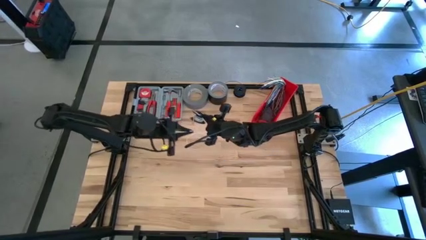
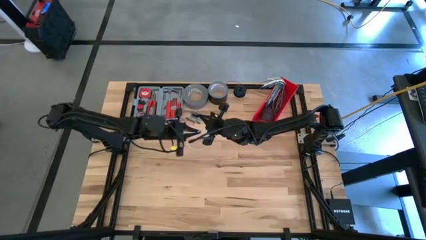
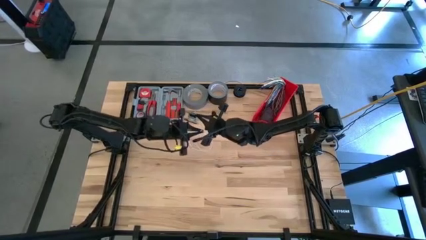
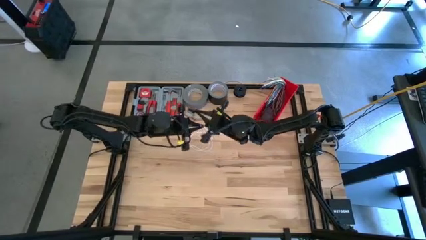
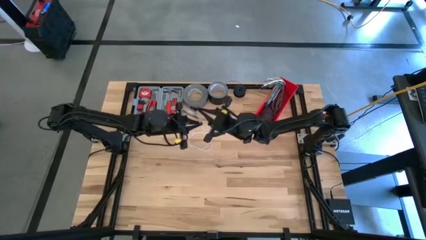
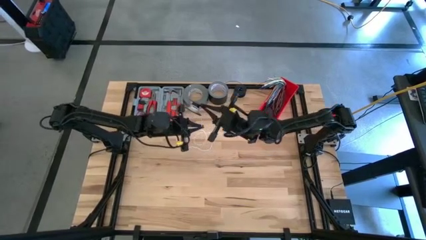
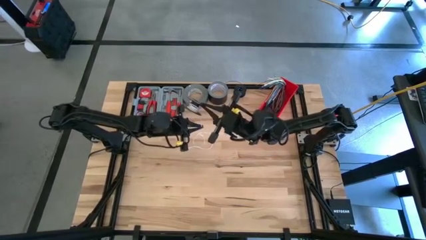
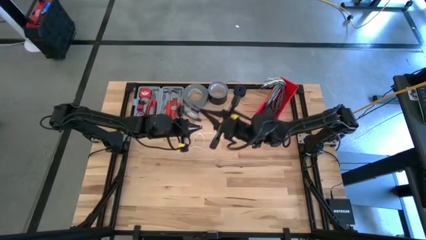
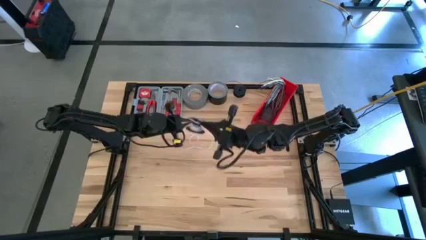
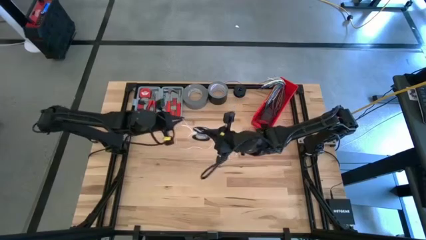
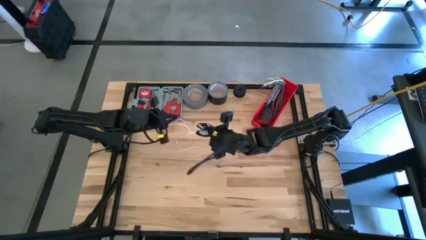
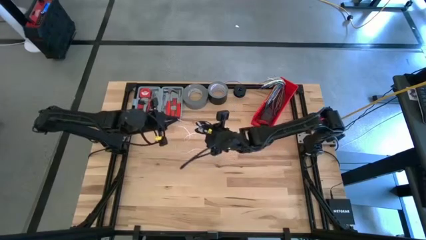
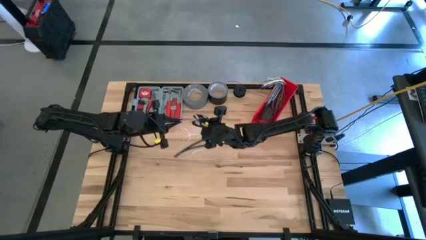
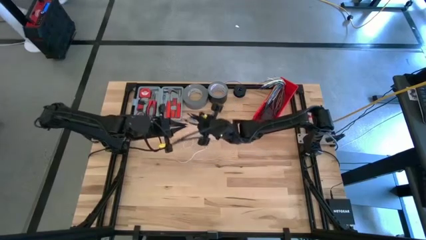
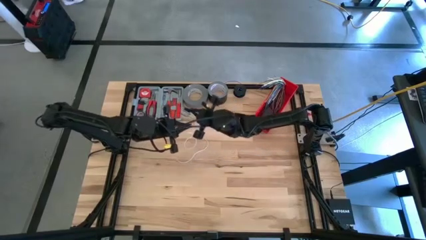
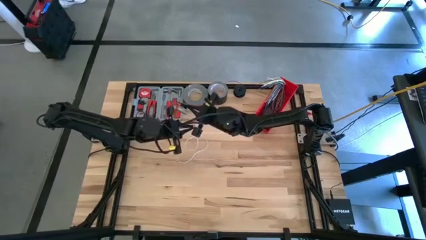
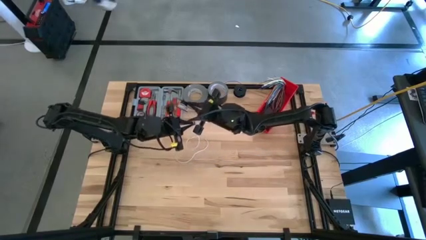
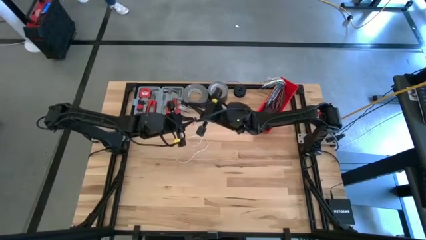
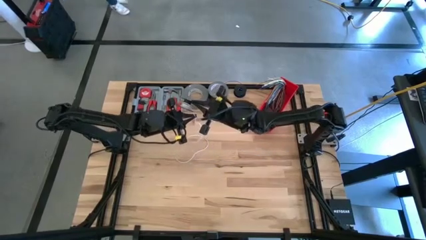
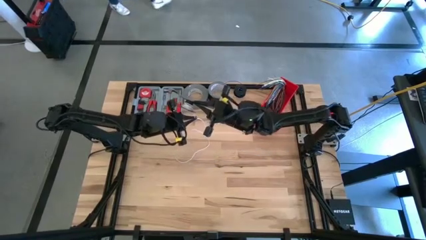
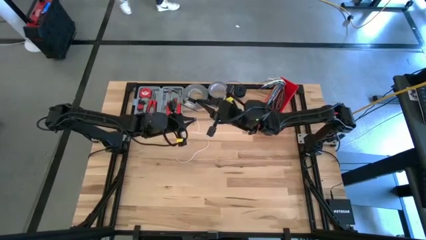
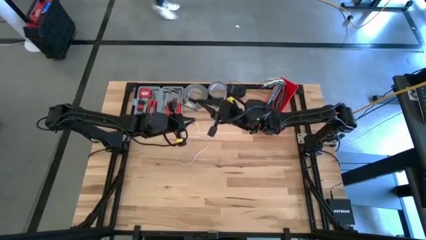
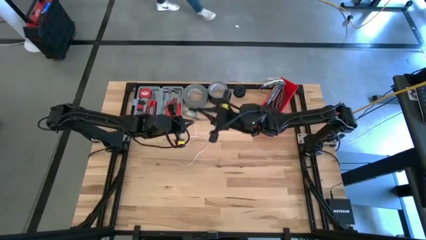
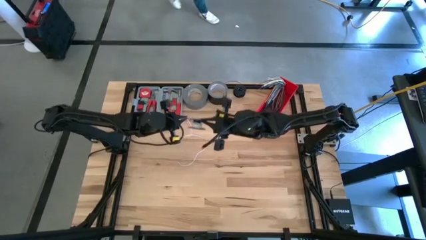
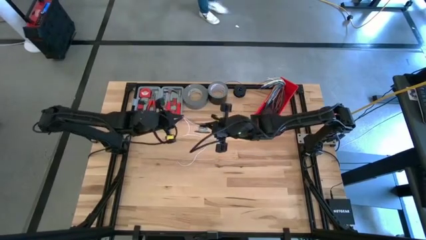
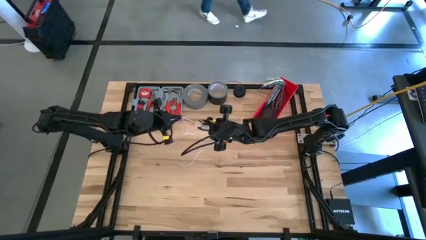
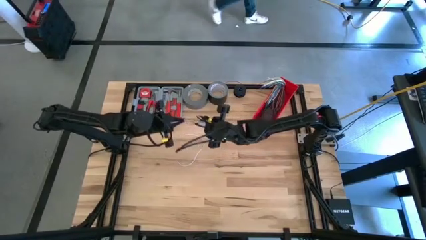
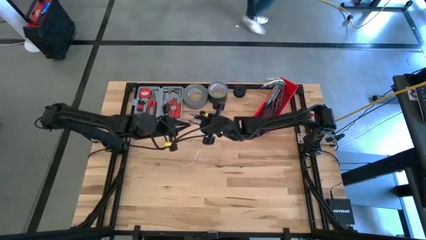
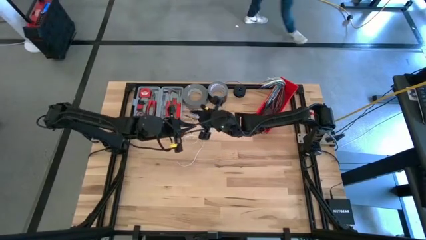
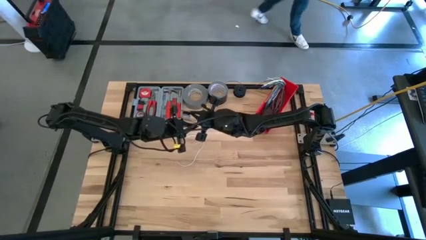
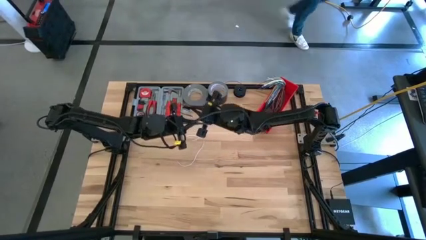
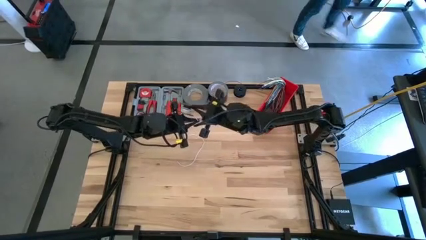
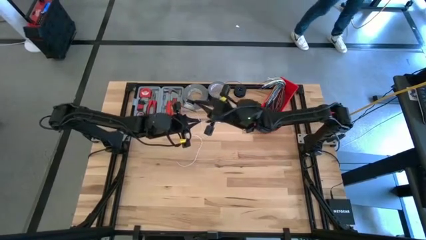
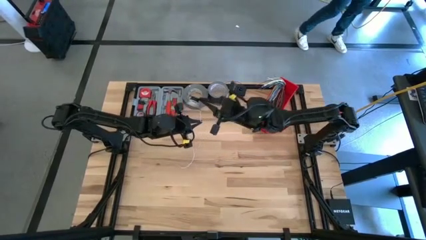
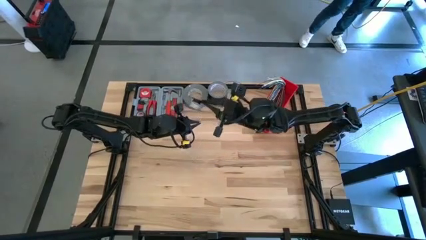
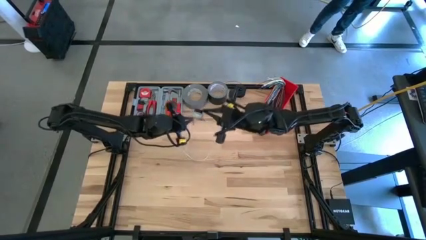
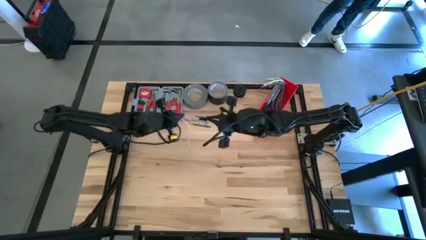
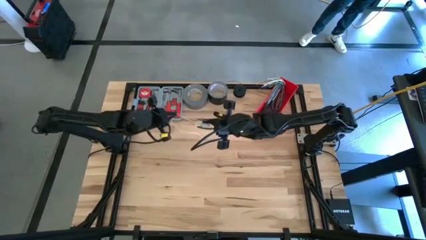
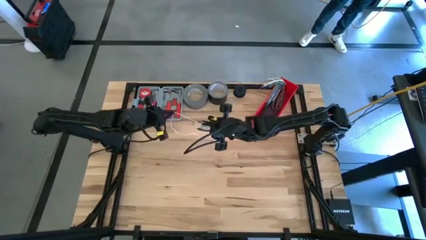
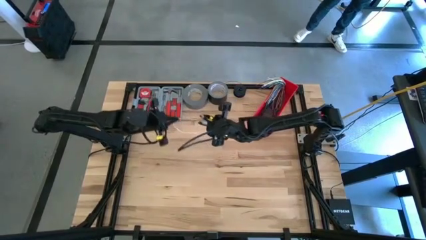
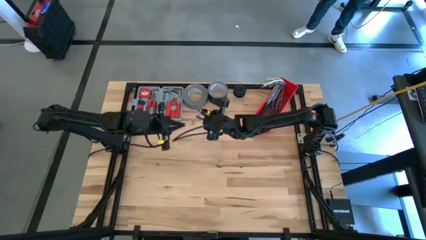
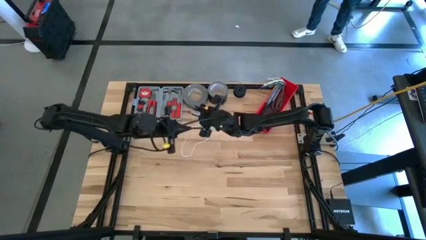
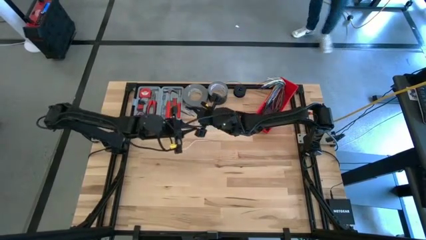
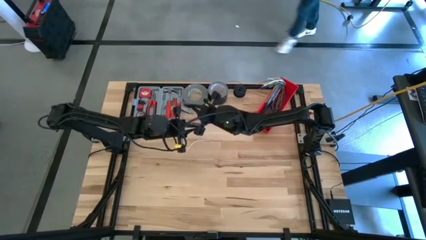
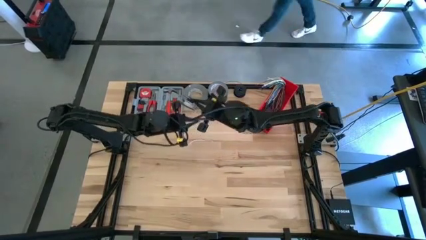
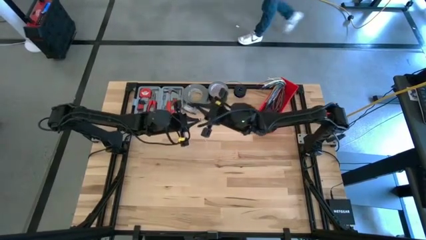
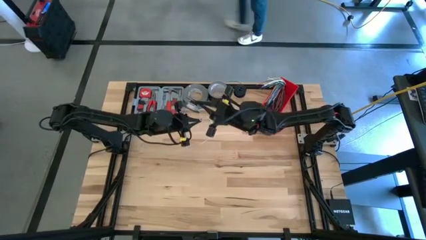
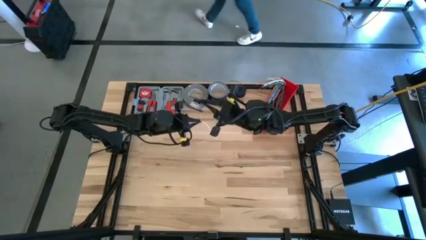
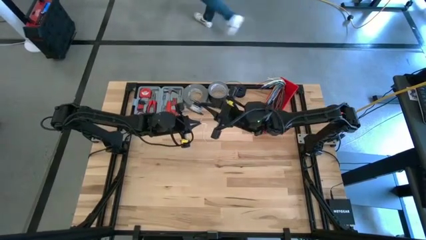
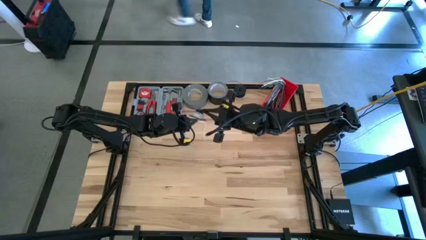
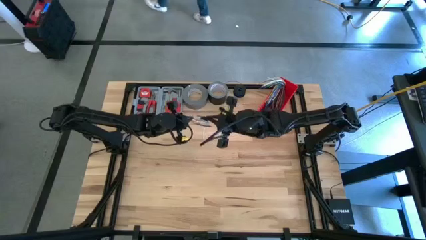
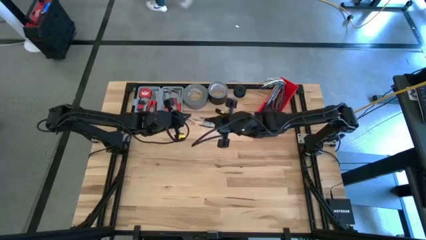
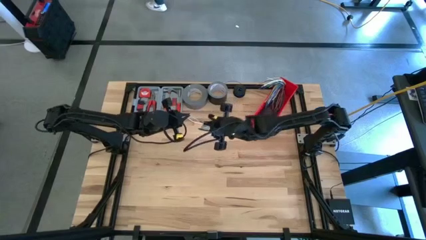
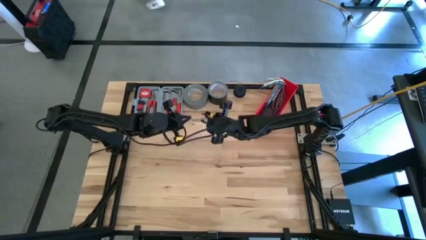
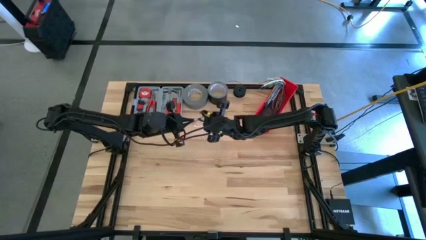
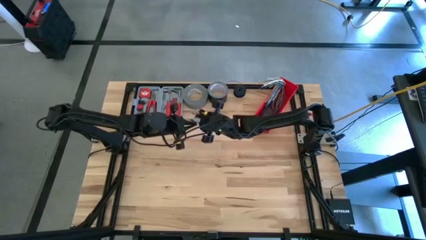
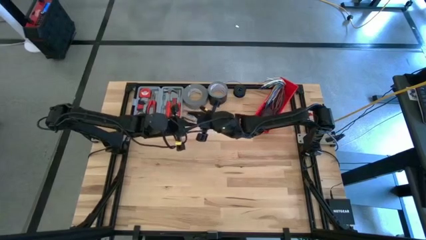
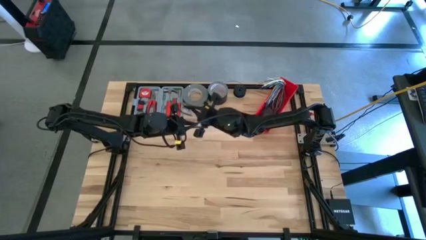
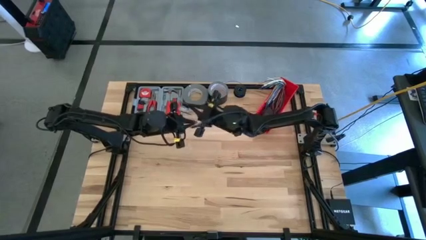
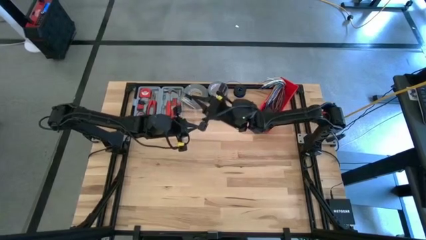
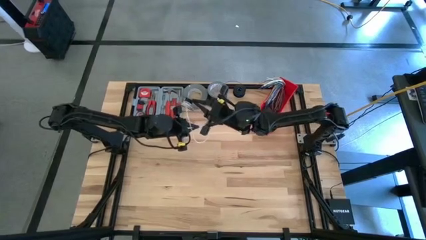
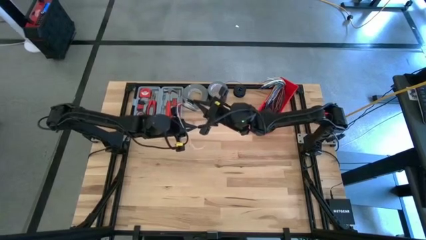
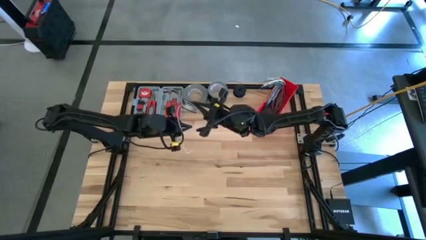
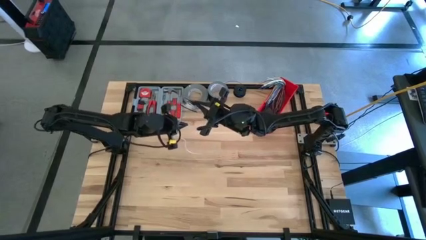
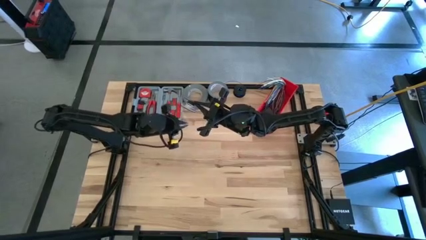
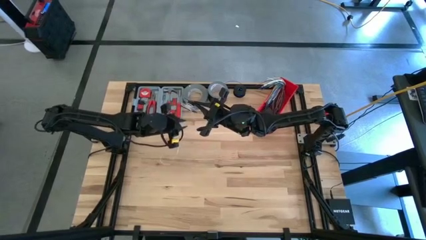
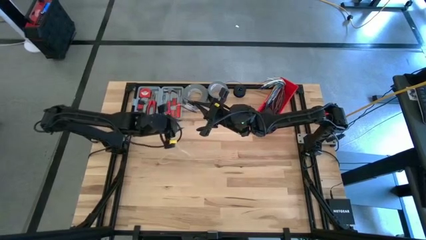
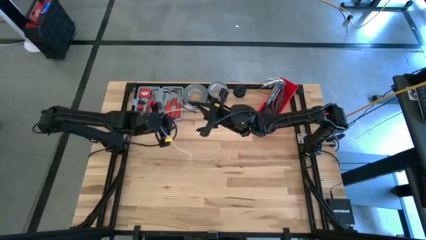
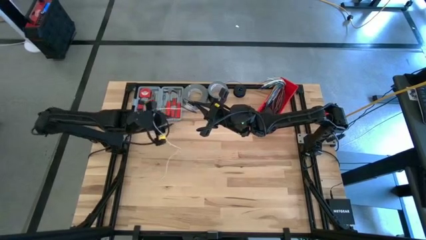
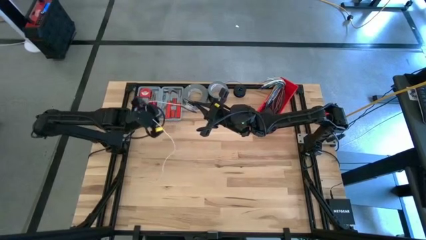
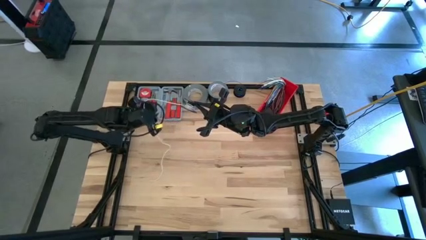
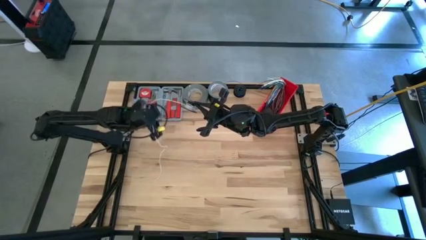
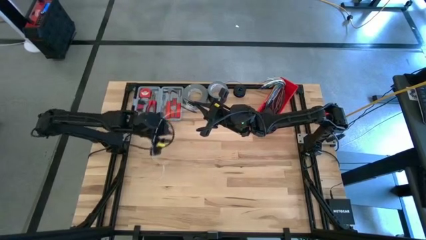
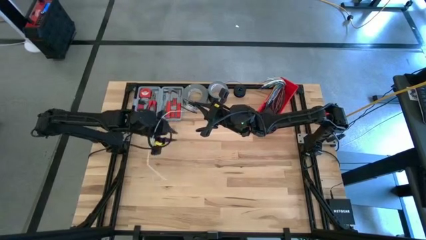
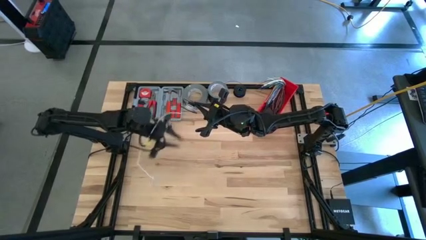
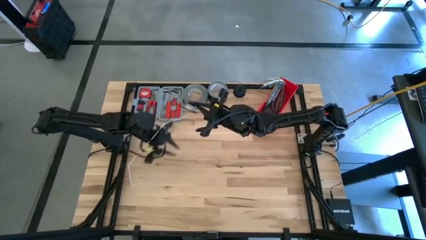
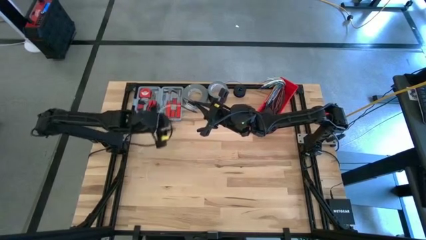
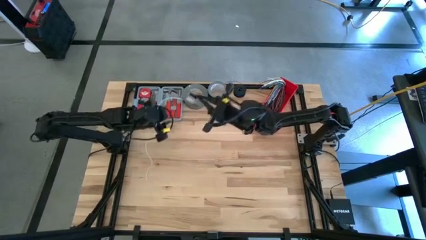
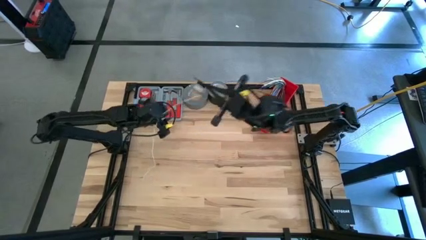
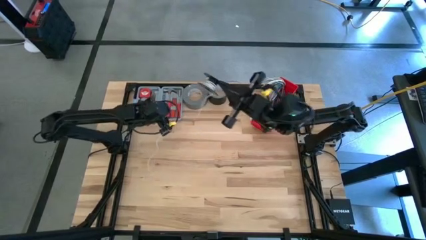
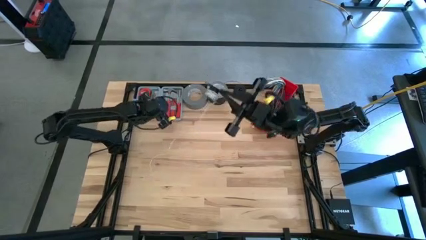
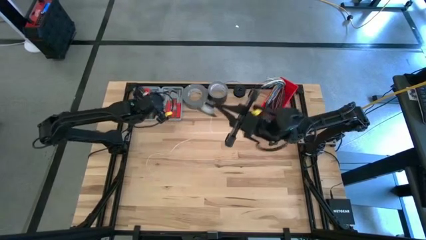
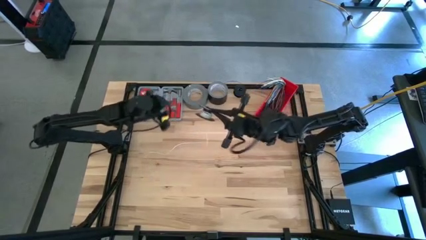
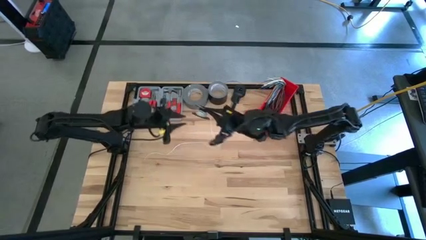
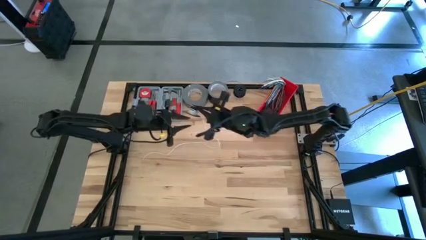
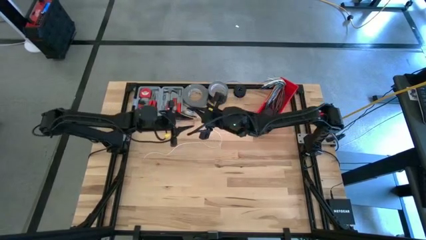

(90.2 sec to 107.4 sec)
Task: Coil cords
Coil the white wire onto the black spool
